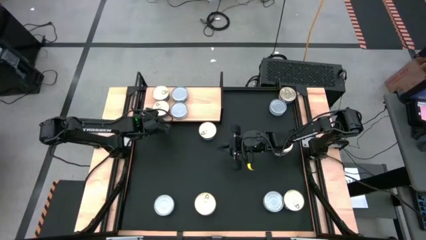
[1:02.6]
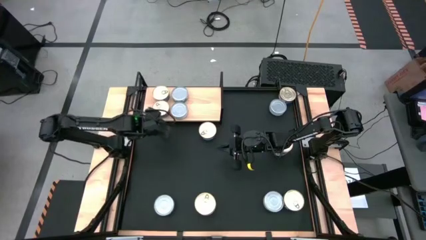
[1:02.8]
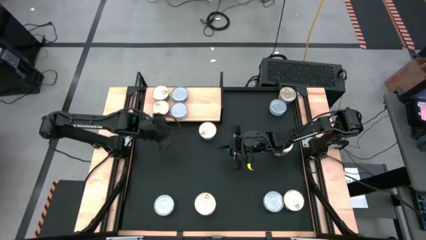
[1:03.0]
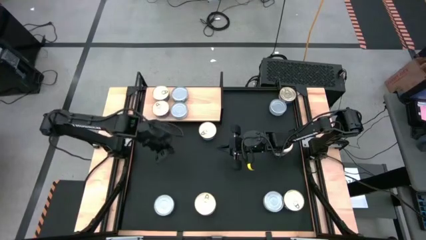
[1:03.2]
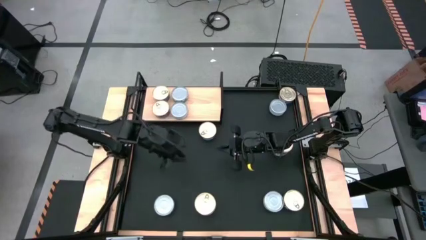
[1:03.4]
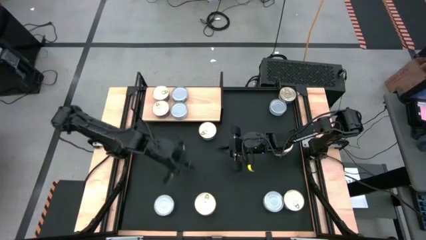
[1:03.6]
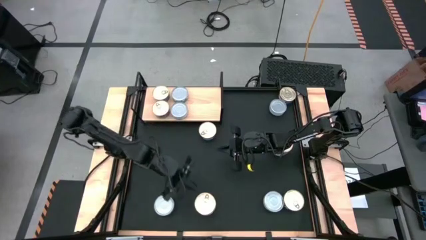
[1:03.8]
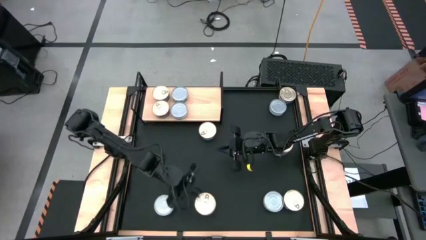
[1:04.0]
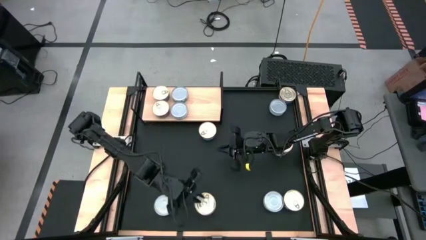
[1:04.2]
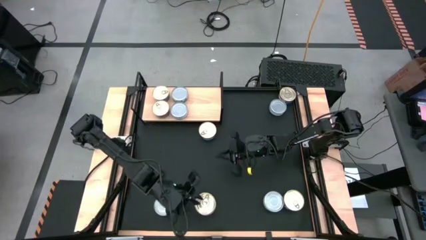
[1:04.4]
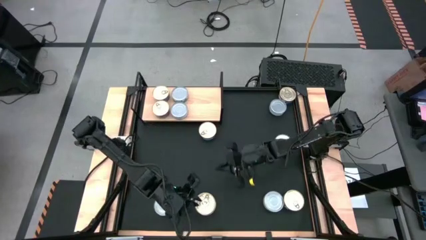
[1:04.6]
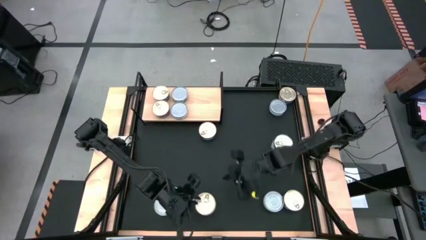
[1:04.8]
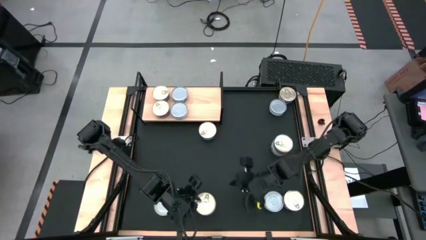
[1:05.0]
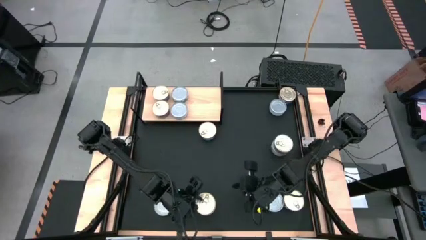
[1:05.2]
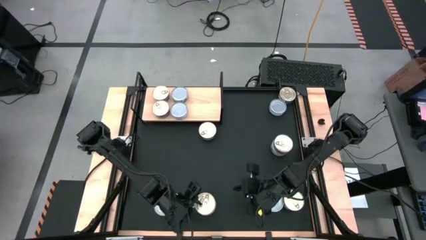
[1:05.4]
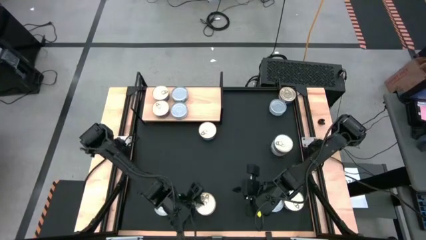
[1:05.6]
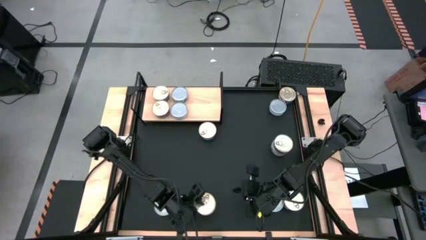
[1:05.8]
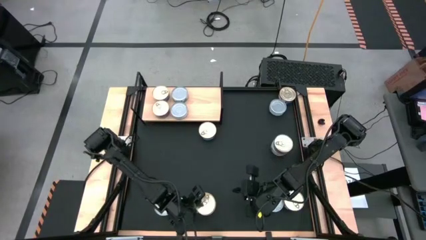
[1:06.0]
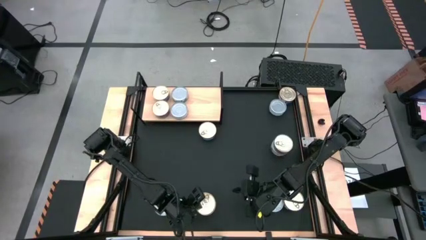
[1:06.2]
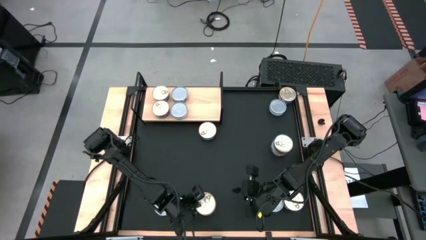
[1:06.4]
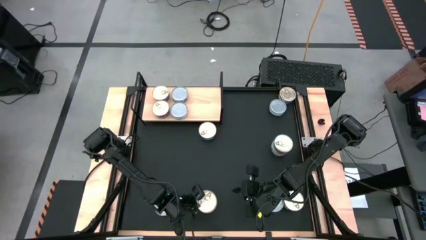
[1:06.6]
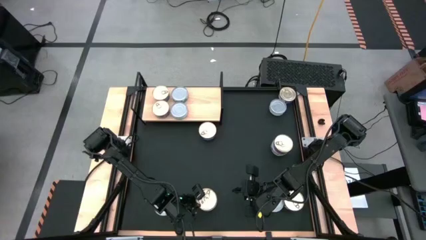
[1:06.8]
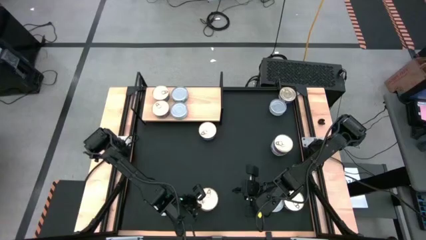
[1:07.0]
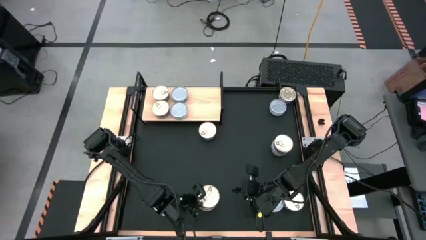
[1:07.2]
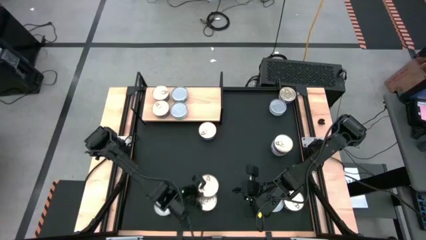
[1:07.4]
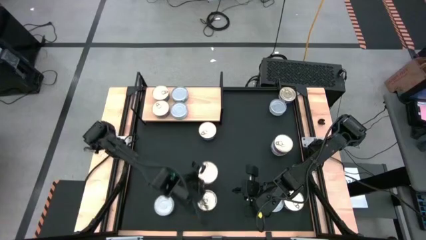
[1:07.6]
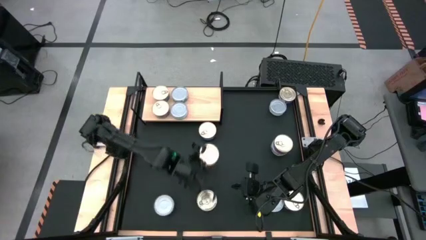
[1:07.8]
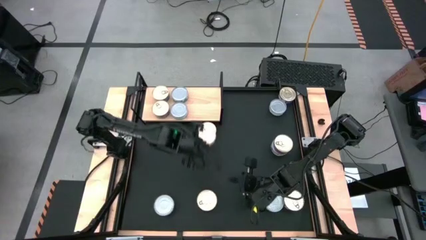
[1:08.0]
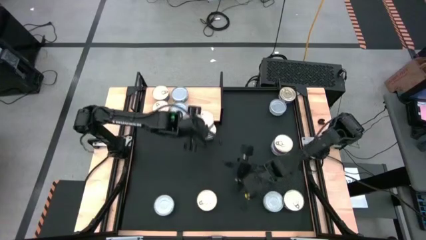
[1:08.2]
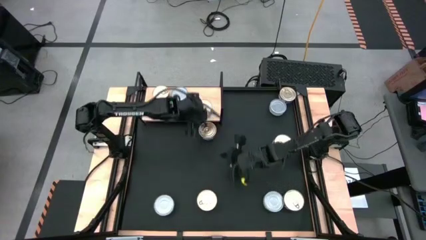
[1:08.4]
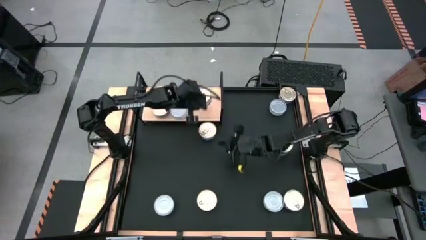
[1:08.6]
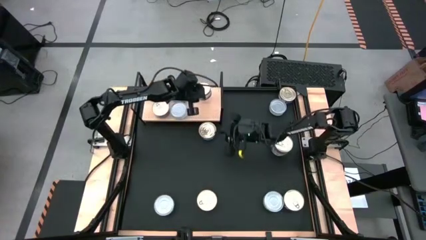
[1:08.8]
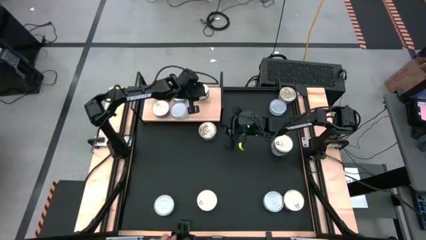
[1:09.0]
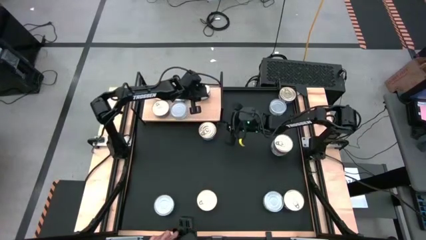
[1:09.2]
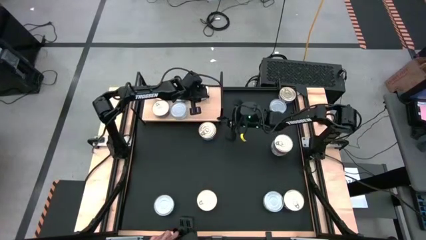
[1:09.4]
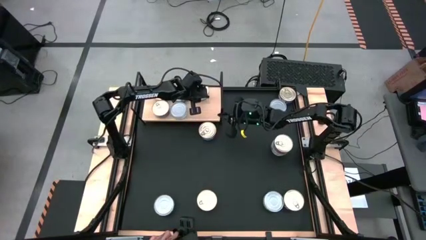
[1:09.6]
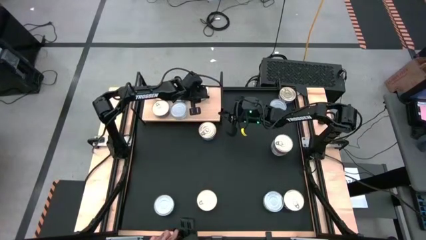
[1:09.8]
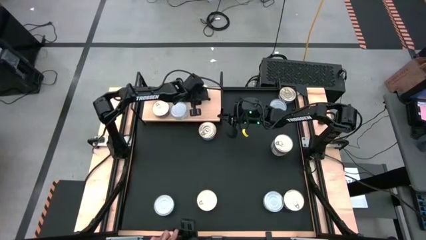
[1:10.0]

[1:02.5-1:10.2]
Task: Stack canned seafood by type on shelf
Put the blue tuna can on the shelf

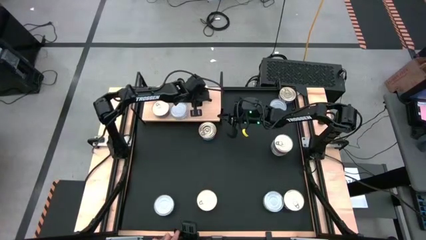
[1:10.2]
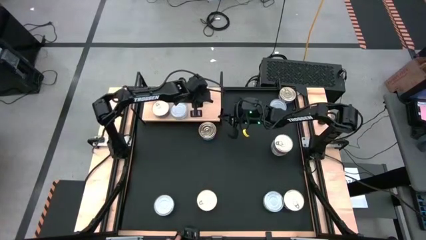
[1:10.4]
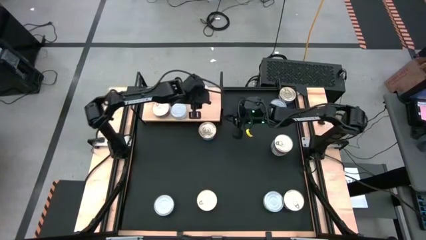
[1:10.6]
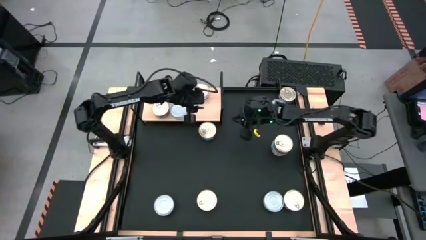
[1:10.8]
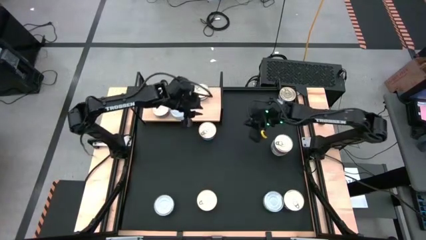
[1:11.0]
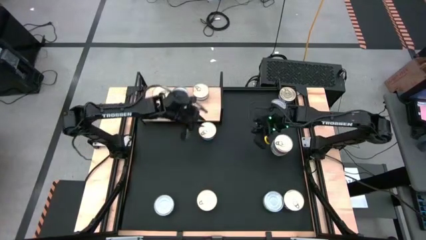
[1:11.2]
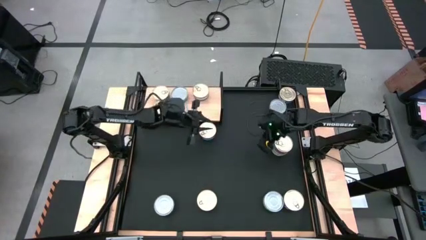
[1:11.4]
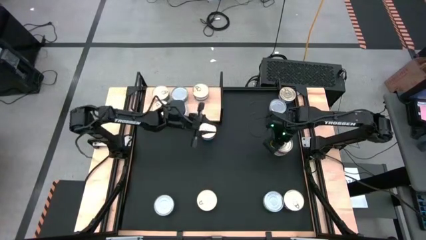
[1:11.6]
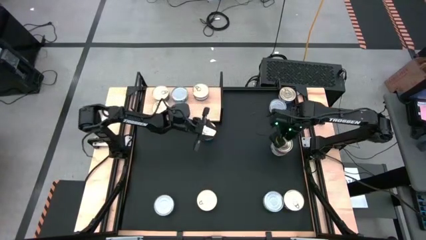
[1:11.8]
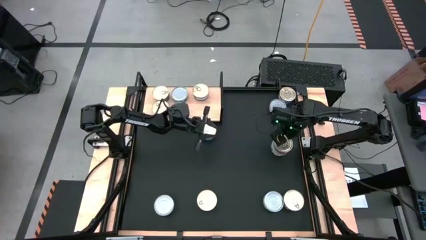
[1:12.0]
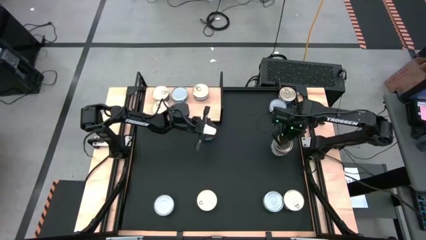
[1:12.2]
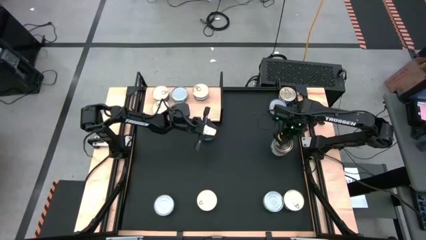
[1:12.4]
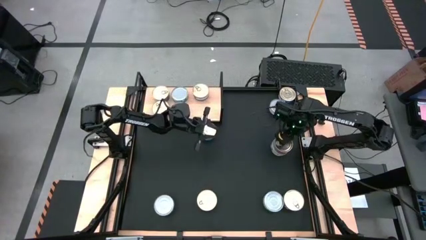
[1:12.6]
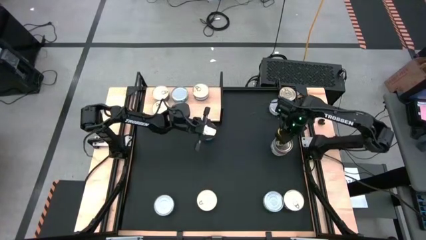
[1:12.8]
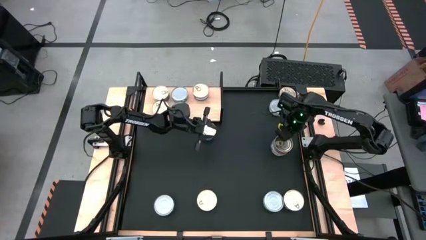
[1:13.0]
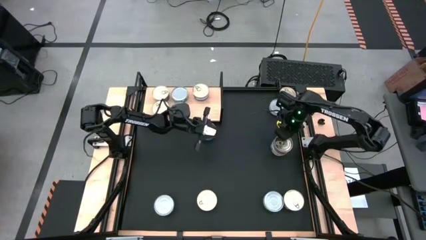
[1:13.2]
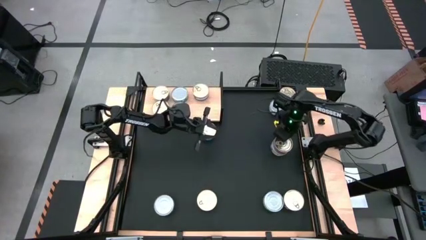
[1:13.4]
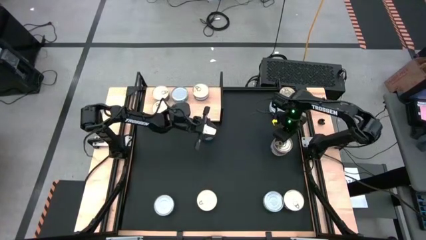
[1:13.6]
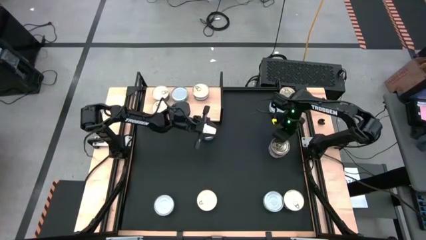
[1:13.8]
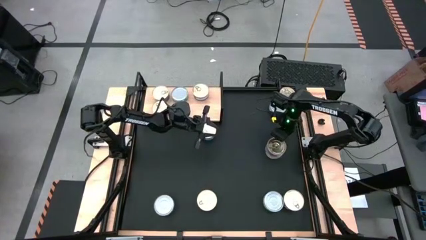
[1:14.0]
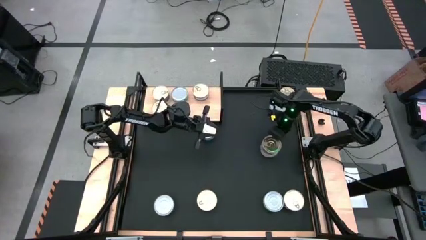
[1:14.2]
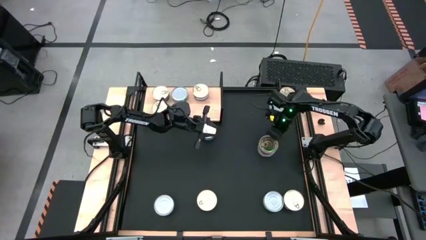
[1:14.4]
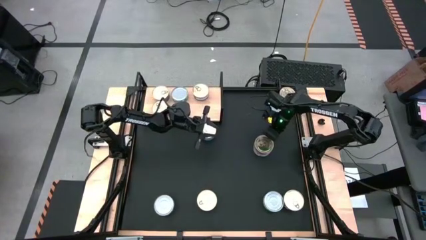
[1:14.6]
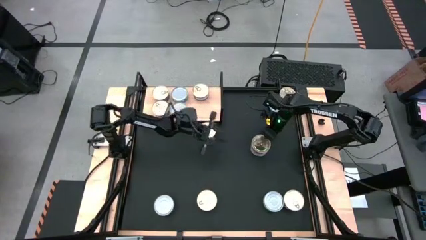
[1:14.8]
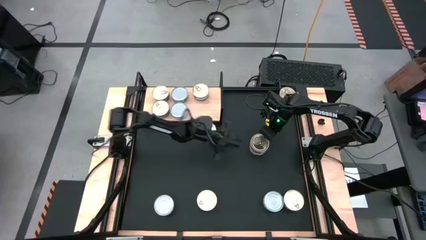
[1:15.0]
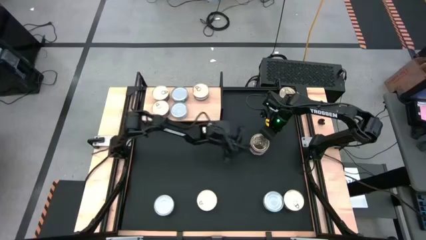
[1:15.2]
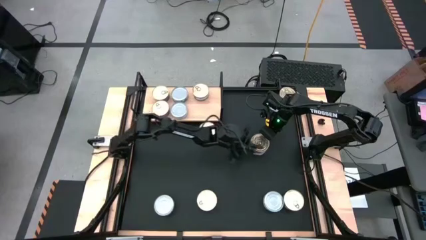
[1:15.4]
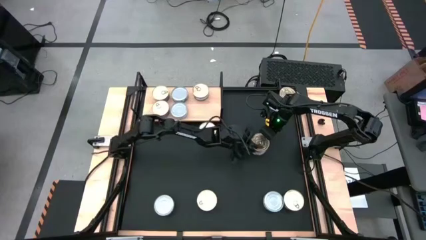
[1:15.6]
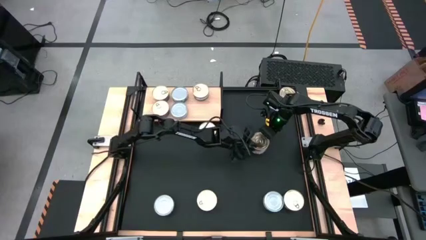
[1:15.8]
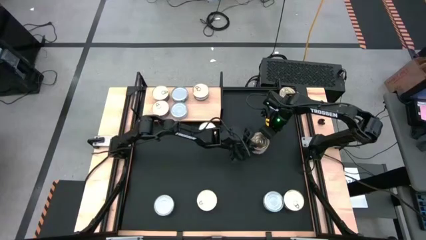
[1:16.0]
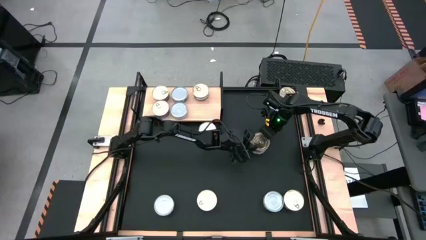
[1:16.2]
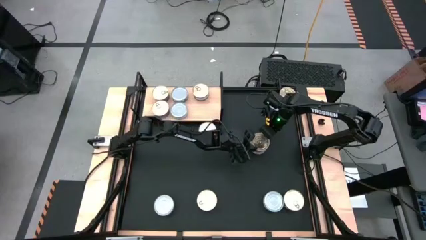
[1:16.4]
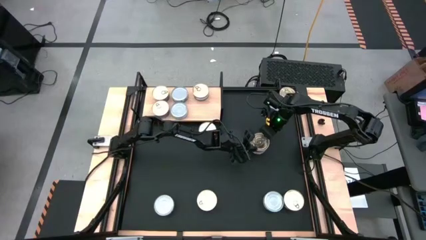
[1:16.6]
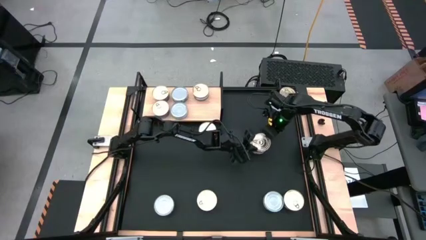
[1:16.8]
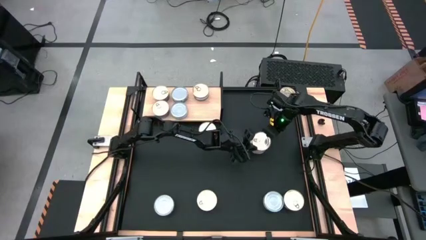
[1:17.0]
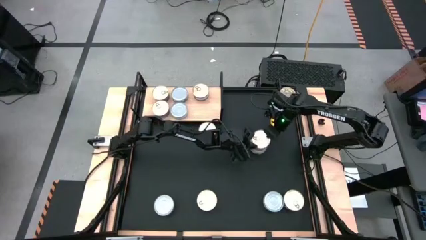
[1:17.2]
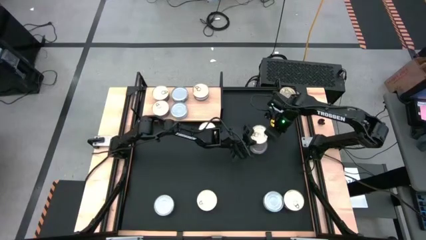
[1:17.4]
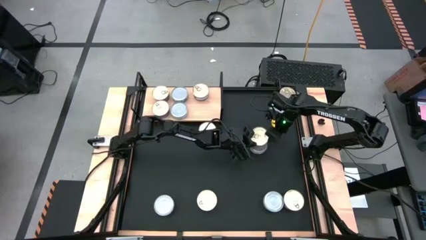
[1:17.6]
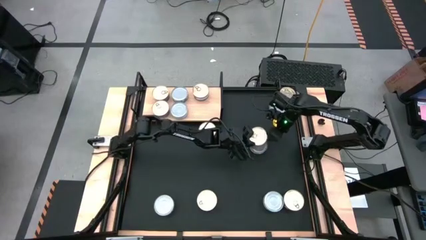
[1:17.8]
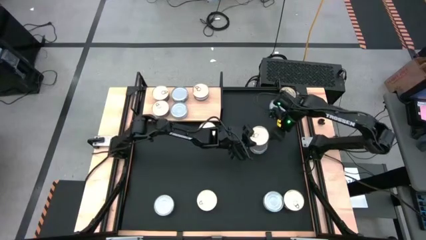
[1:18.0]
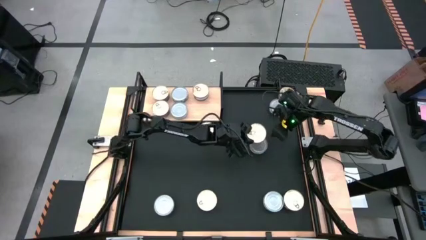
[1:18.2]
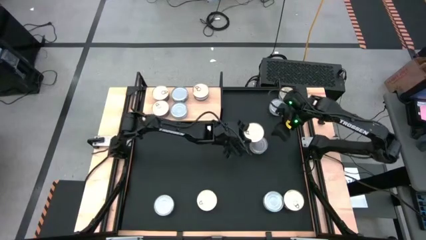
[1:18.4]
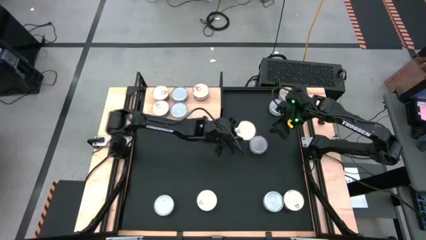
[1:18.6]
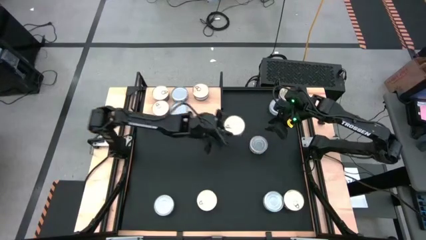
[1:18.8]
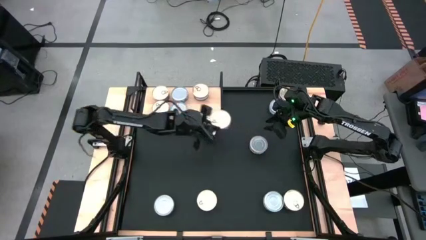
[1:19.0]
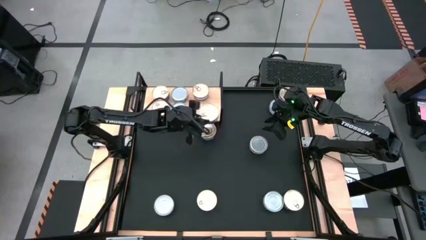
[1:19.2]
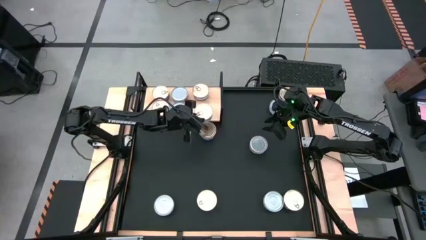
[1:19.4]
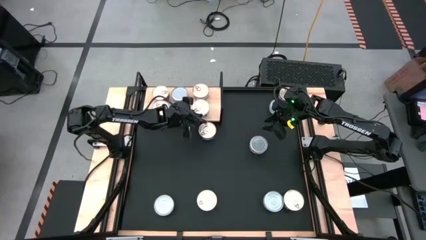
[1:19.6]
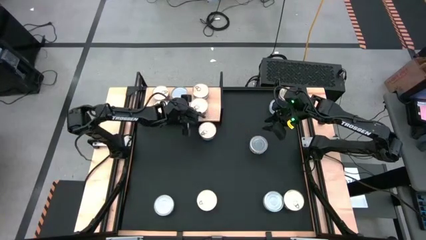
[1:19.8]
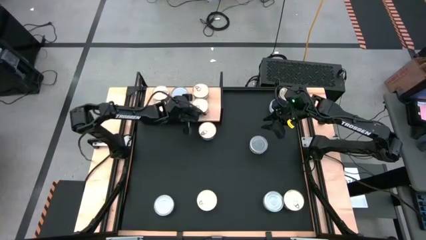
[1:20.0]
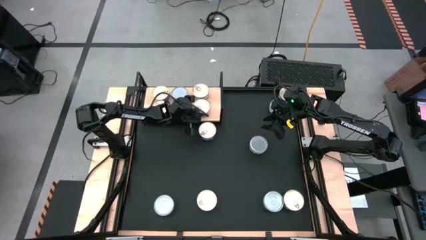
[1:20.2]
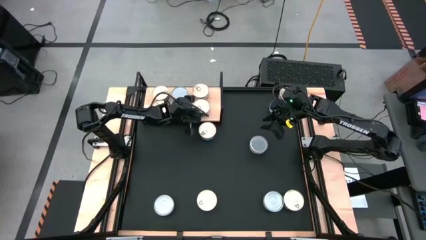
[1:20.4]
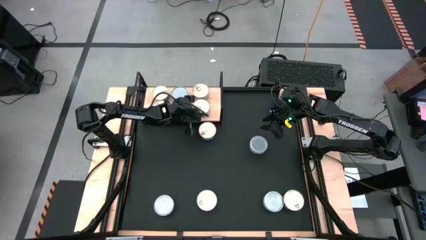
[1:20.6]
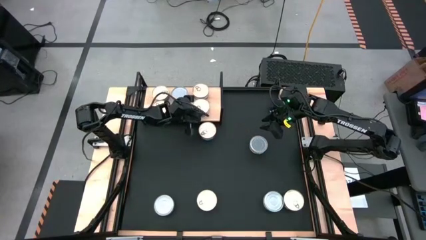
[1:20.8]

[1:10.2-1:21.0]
Put the blue tuna can on the shelf
